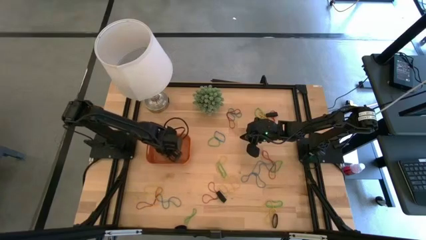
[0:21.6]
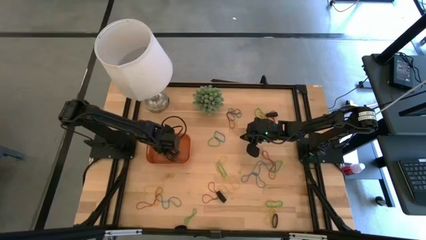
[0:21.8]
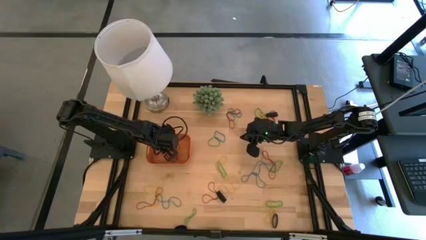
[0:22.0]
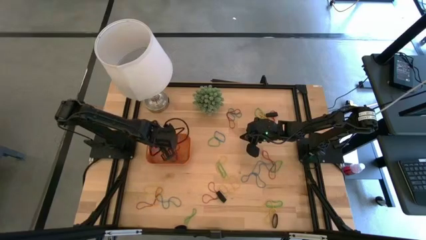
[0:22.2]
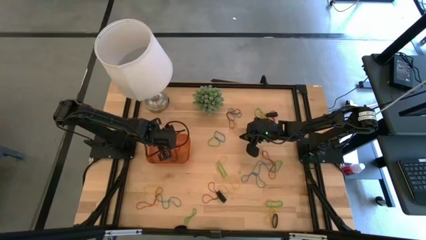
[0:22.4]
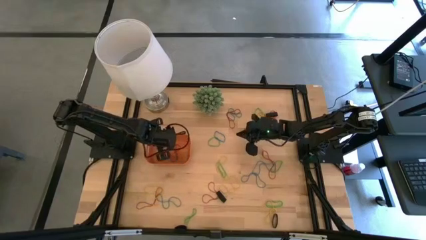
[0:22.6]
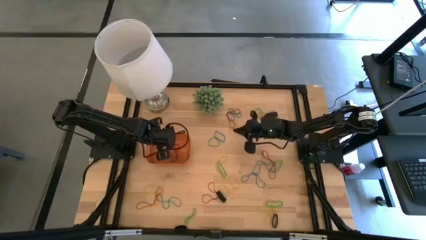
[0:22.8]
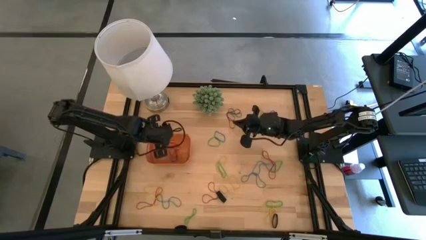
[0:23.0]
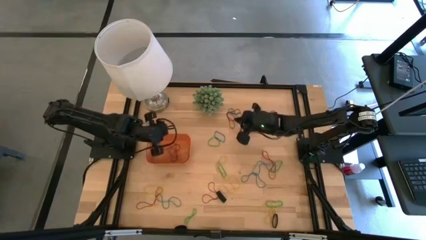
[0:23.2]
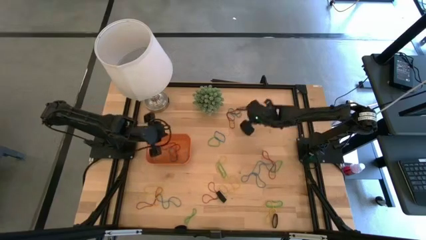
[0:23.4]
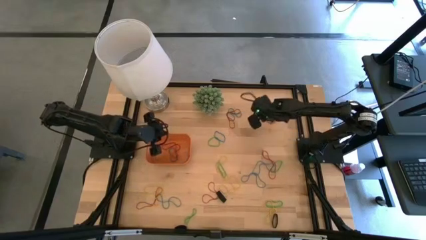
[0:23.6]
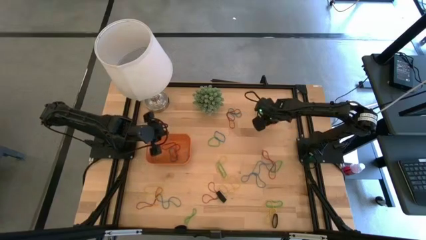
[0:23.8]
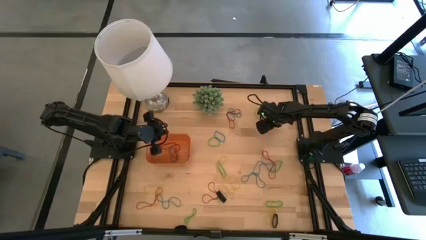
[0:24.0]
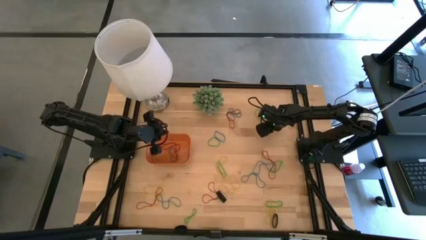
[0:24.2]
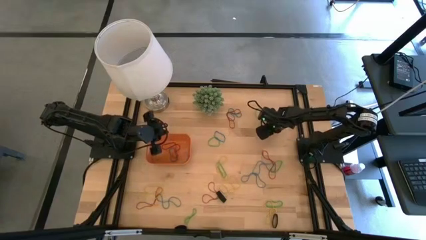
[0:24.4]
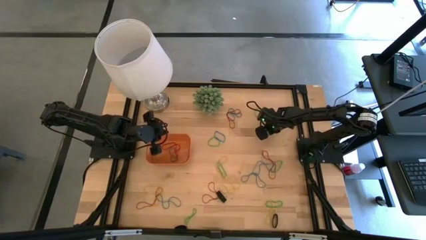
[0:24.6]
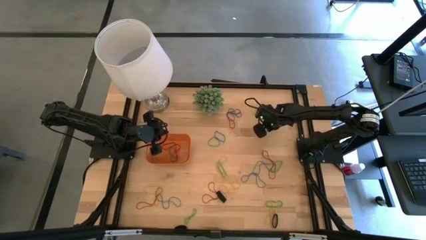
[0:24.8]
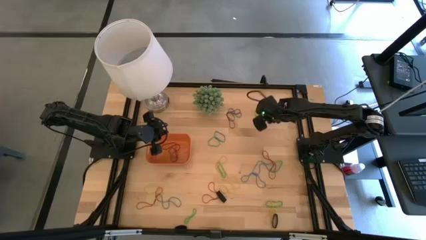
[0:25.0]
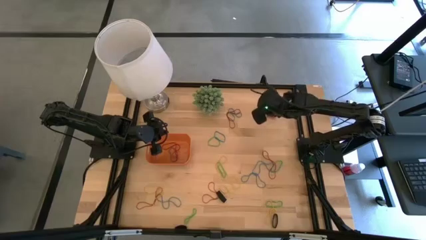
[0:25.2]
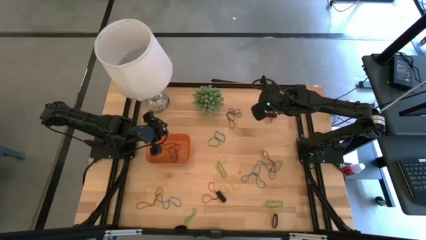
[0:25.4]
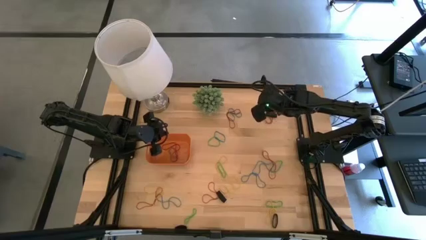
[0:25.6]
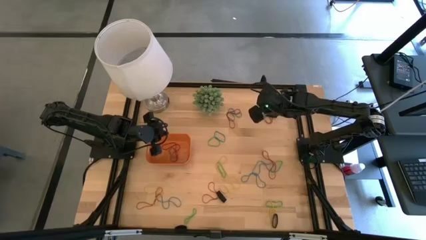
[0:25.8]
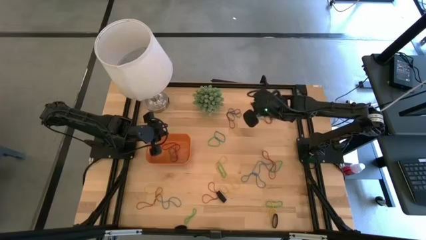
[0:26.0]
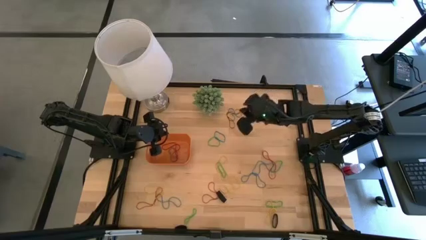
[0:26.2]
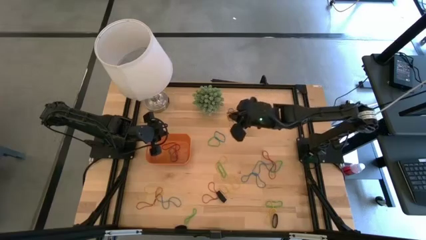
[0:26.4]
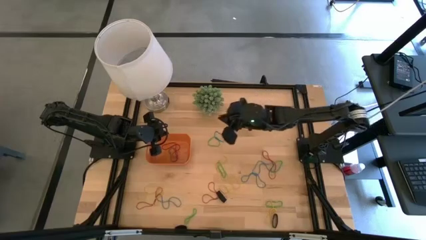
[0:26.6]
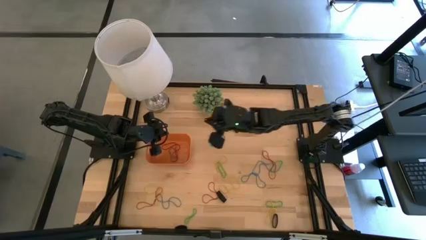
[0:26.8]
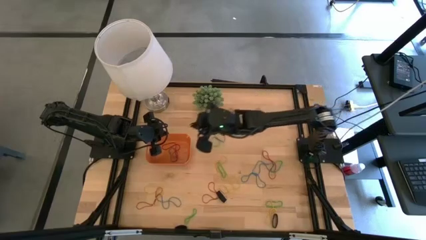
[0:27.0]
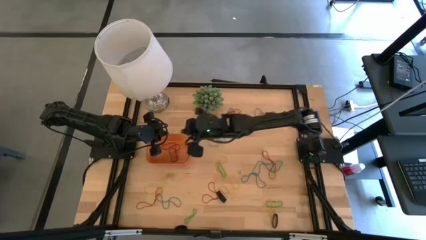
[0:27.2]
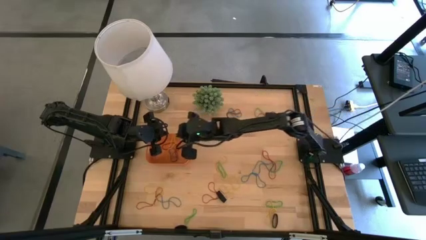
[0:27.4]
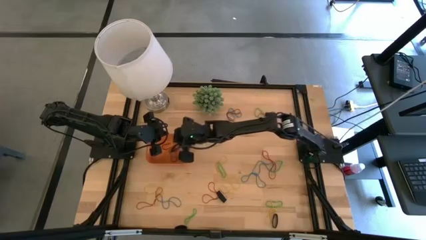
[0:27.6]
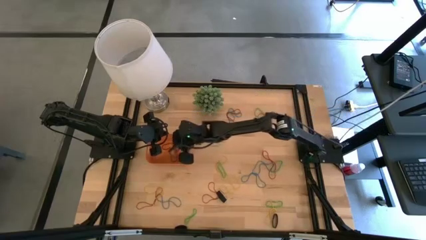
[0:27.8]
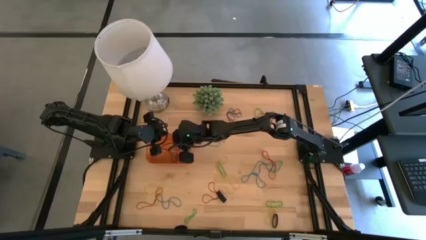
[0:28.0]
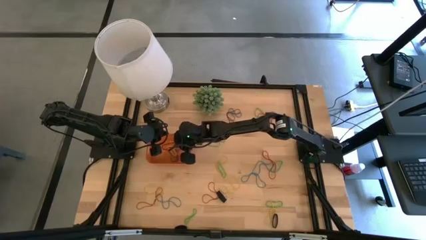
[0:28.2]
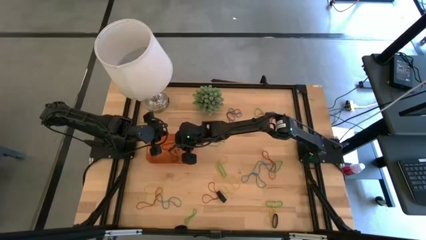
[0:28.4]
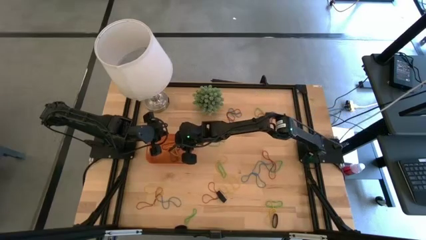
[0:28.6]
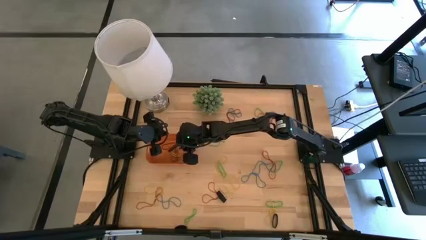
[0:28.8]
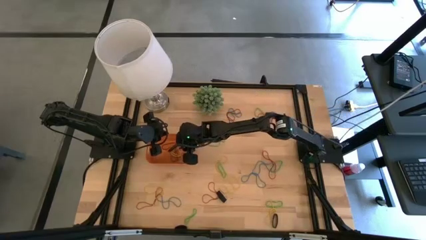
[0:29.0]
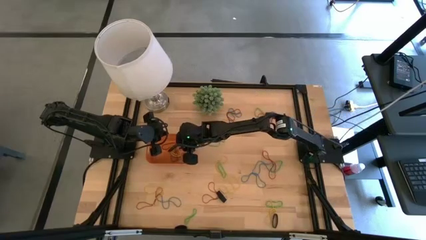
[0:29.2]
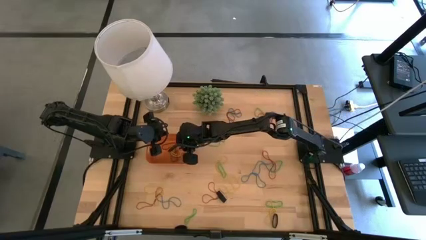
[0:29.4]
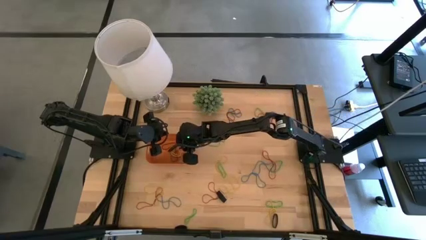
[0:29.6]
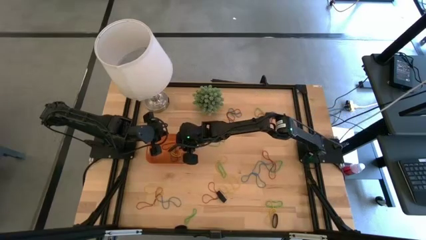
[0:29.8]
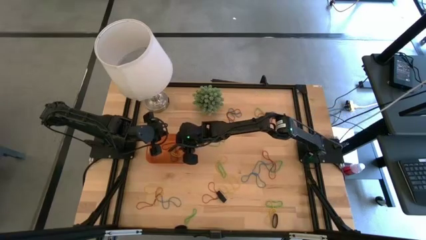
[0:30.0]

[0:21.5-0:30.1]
Task: Pick and place rubber bands into bin
Put yellow rubber band into the orange bin

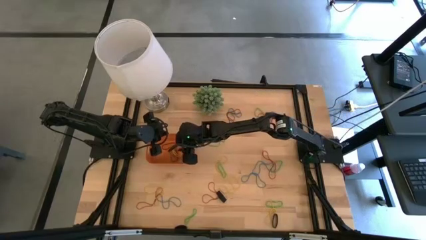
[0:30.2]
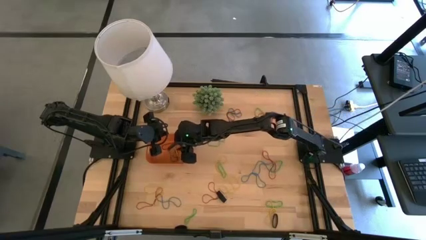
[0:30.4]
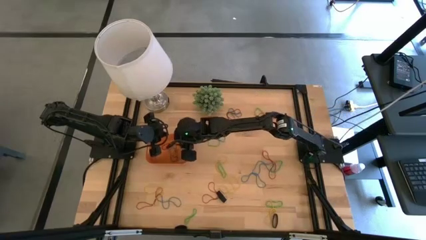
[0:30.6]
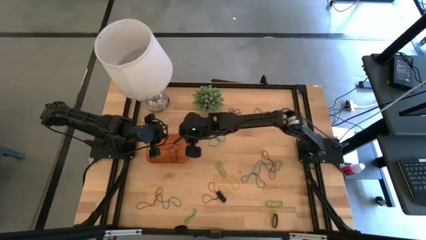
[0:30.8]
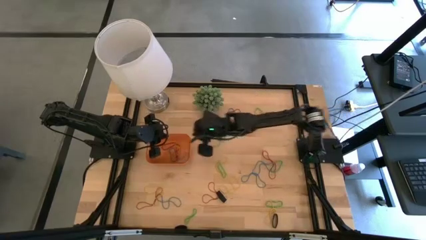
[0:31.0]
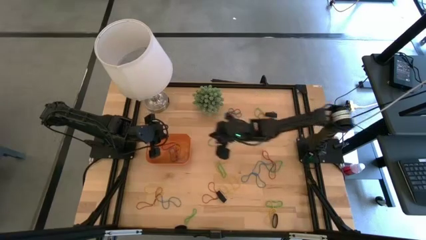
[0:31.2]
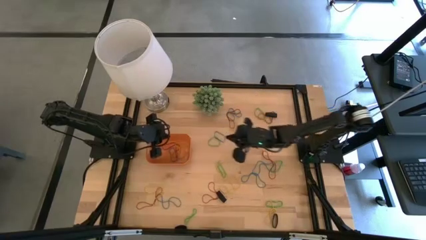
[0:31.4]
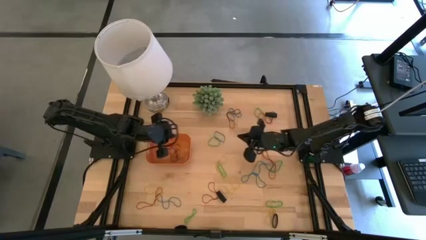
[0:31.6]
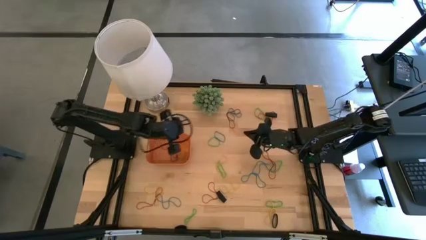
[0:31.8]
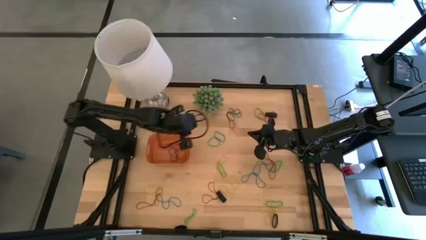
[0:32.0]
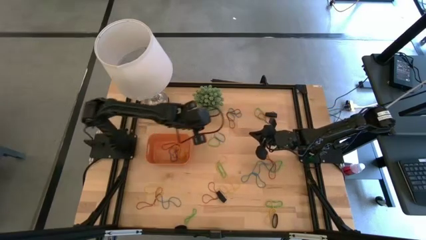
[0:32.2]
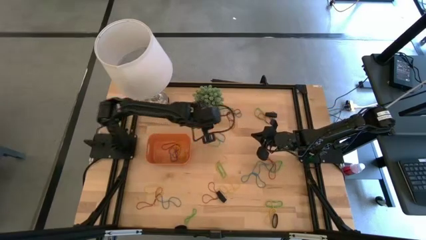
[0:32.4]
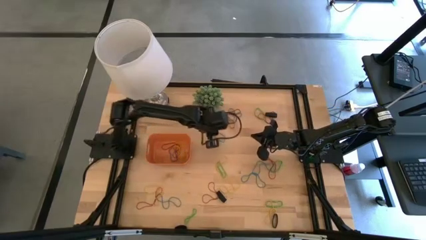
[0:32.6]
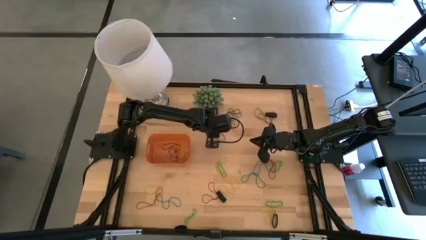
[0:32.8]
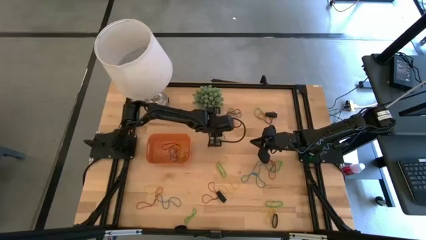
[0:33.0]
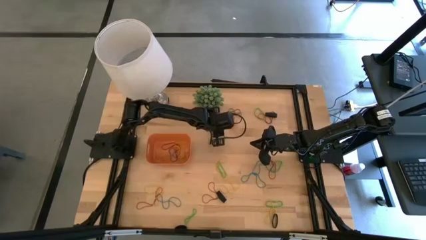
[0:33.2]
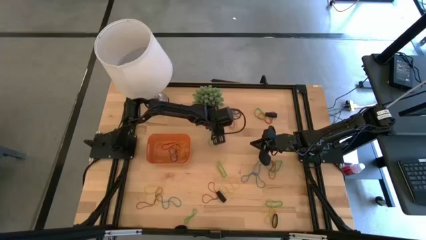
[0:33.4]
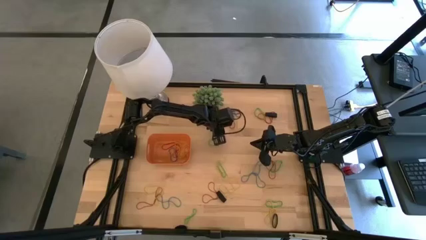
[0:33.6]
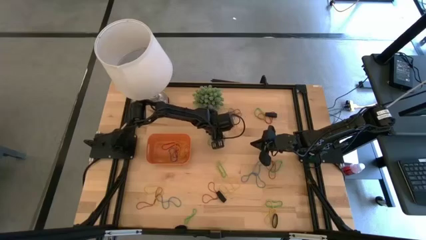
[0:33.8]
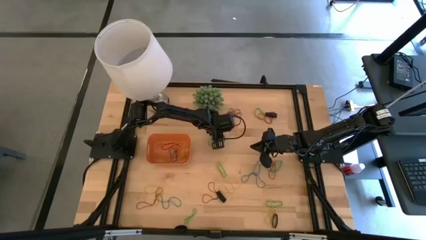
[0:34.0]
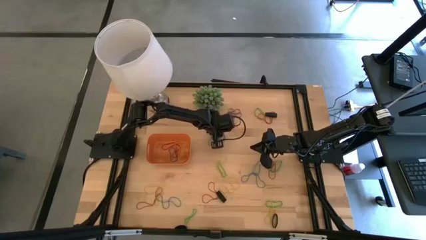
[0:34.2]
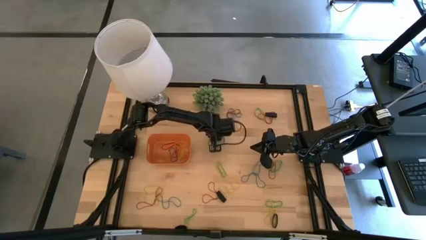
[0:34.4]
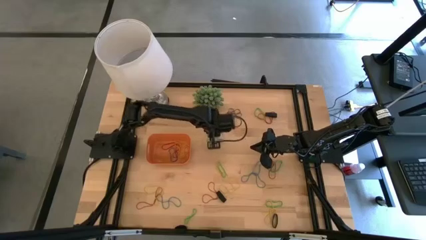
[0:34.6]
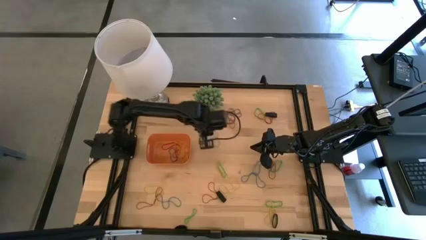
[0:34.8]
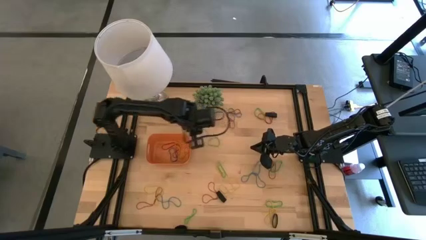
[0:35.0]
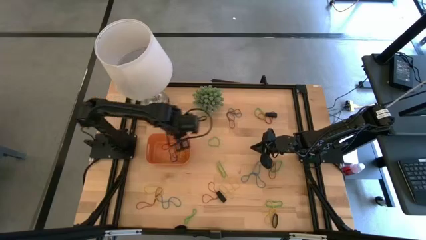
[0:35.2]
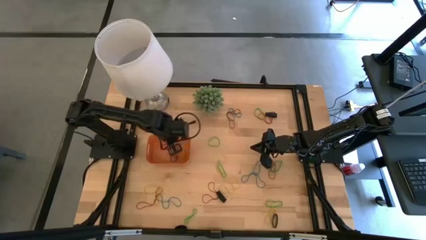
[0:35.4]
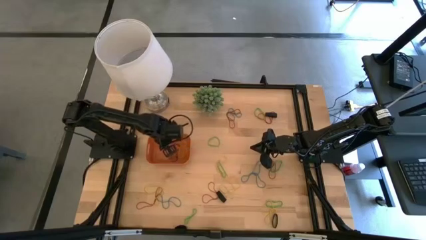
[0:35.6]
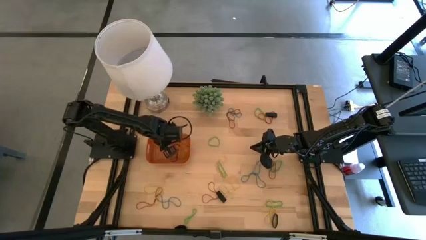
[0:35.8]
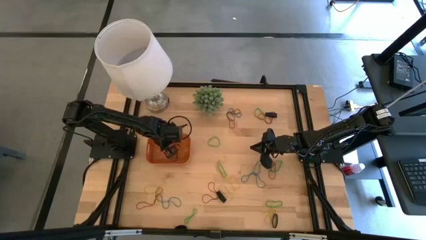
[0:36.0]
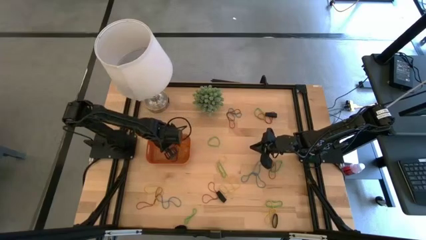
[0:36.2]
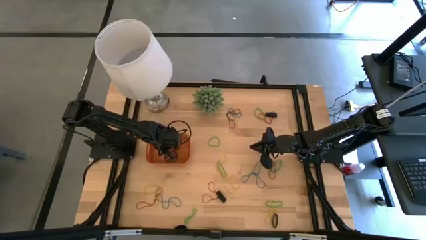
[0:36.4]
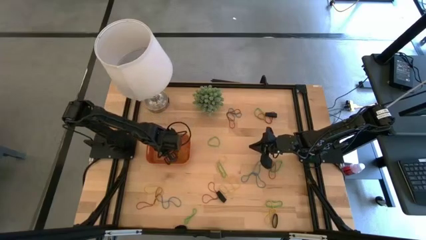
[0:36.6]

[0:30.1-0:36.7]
Put the blue rubber band into the orange bin

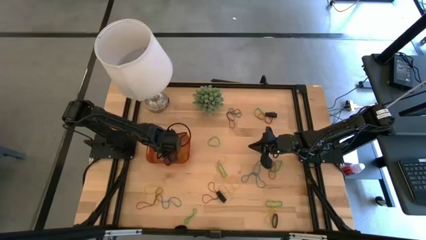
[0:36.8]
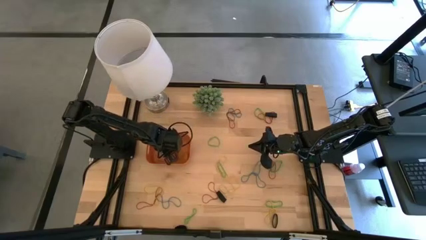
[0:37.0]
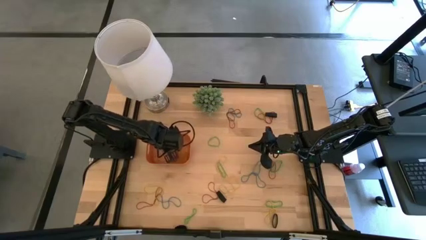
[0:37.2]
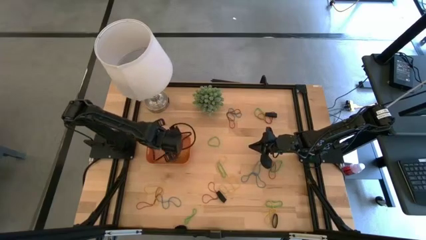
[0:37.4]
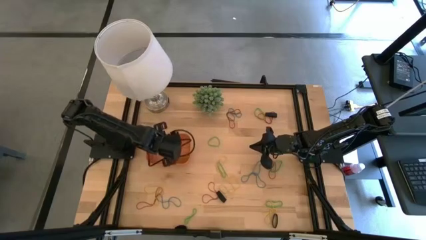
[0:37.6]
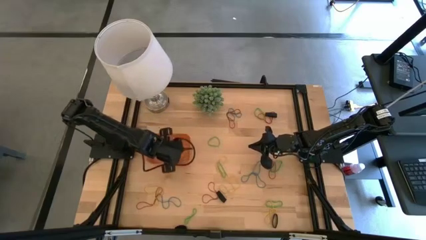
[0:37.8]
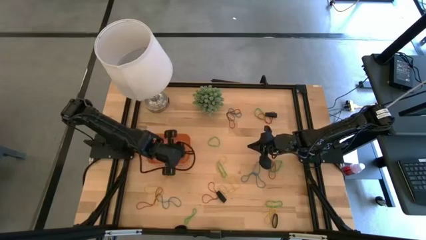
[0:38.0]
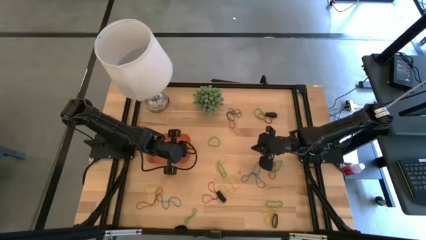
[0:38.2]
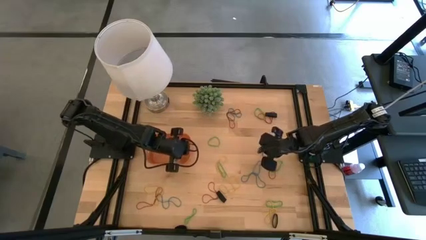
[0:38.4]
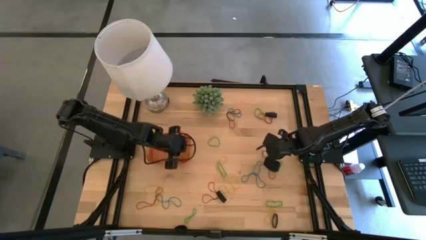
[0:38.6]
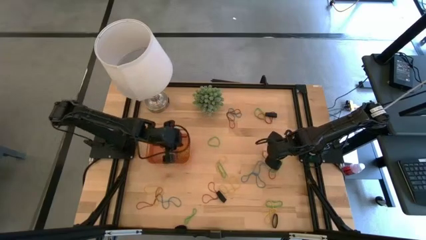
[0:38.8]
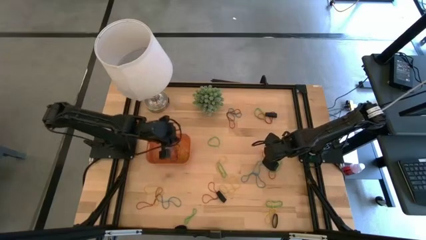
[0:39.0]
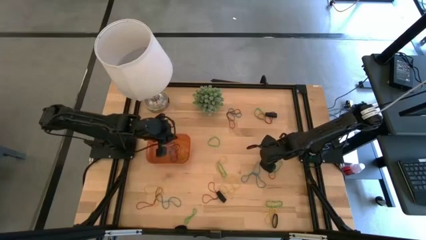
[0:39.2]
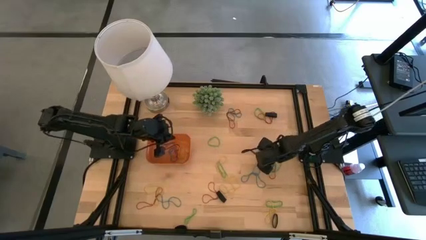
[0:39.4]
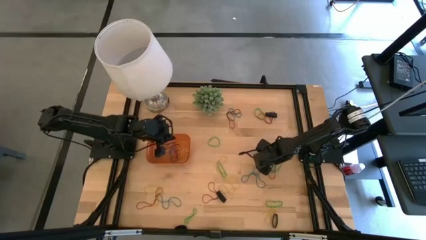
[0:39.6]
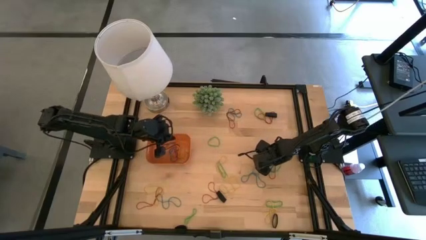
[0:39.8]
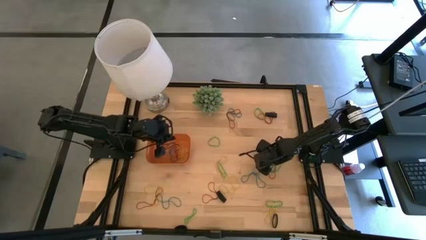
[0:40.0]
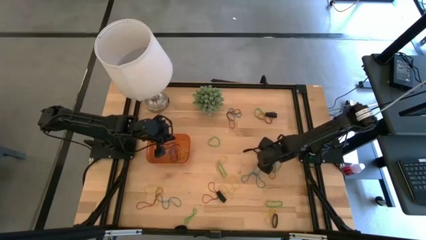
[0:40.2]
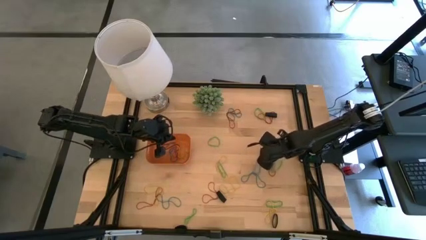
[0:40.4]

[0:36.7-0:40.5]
Put the red rubber band into the orange bin
